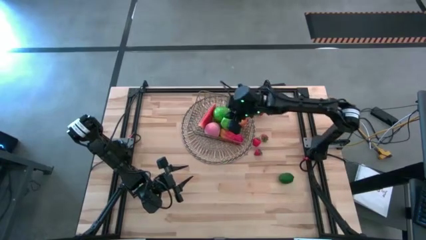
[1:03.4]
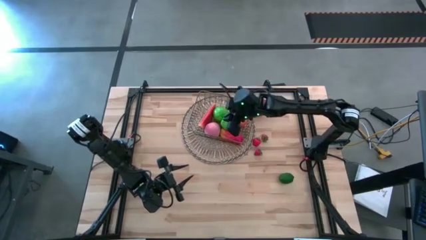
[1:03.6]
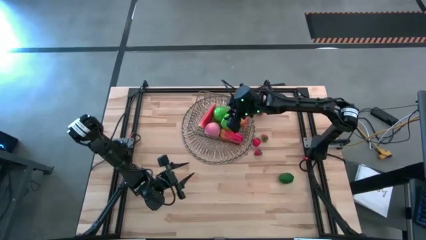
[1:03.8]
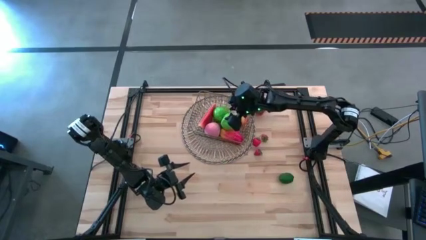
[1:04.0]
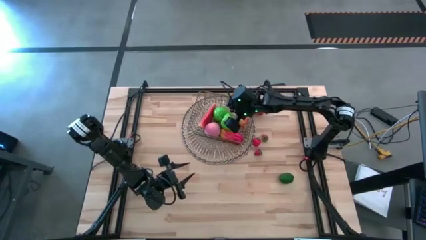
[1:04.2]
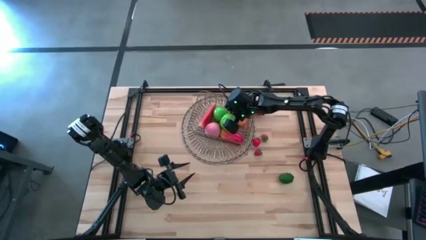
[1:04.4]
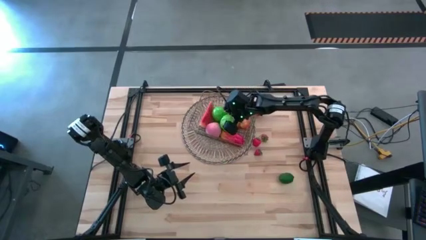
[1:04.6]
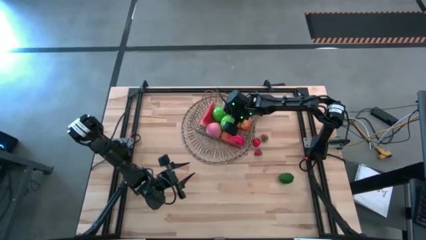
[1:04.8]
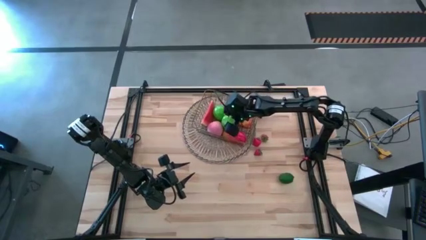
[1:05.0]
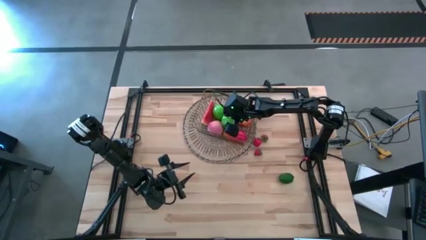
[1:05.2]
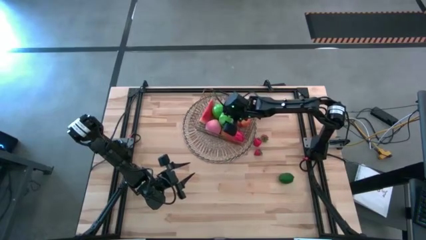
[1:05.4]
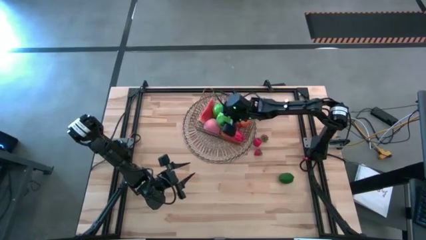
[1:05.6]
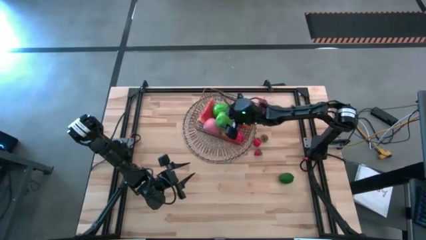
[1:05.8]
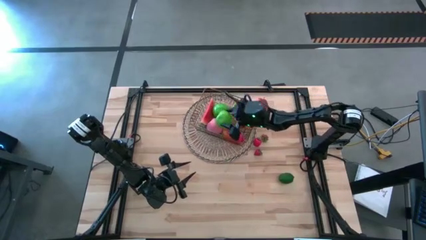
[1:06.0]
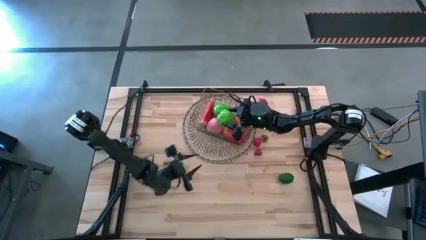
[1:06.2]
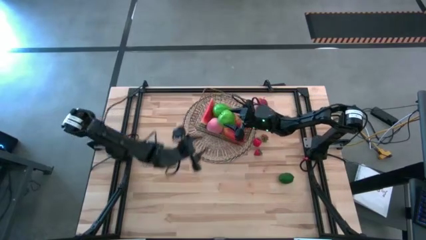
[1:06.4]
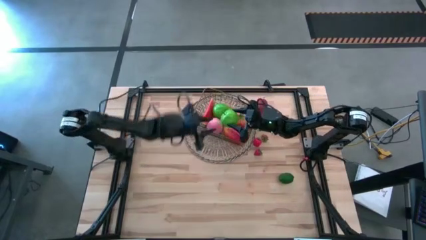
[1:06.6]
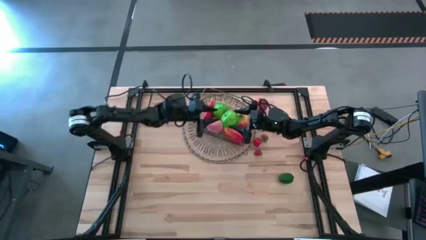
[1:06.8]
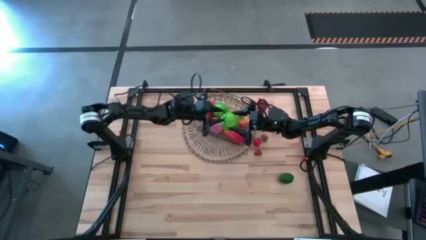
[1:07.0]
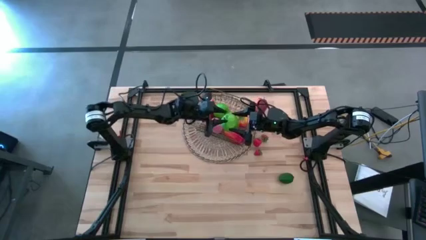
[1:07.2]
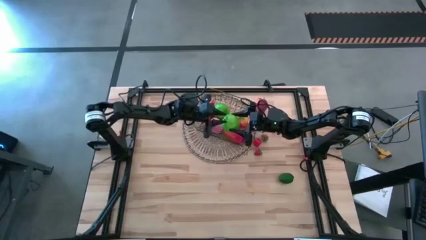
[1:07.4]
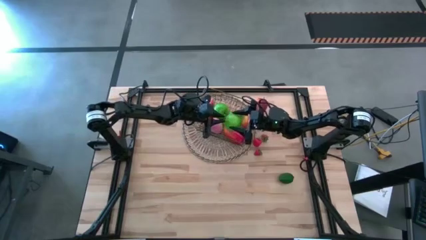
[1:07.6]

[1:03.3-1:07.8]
Task: Build produce basket
Put the green apple into the gold wire basket

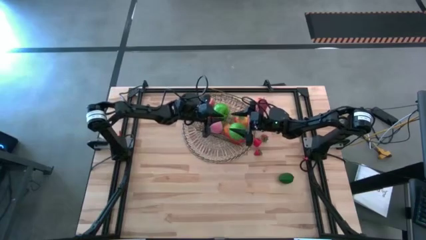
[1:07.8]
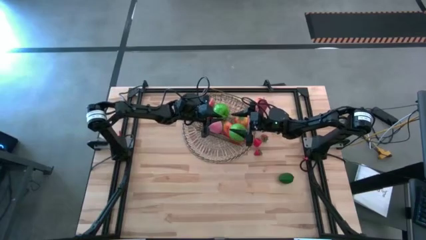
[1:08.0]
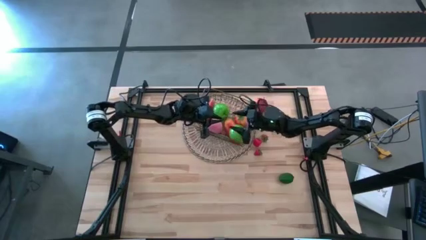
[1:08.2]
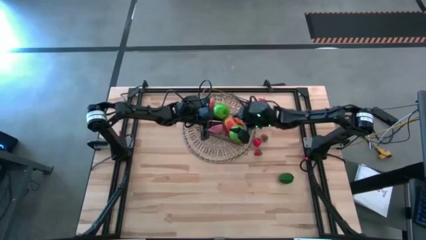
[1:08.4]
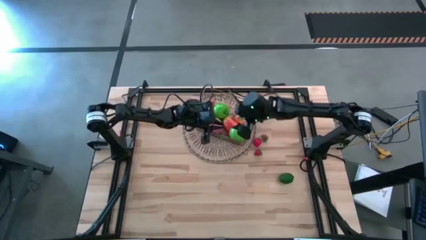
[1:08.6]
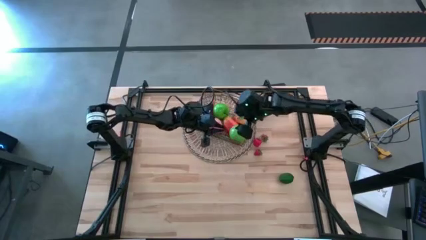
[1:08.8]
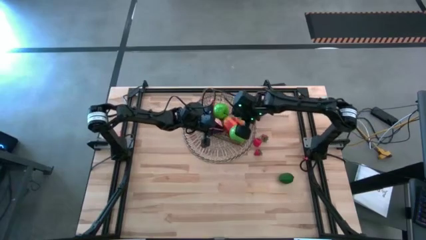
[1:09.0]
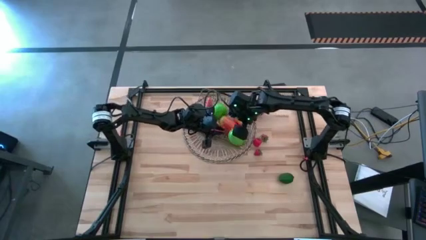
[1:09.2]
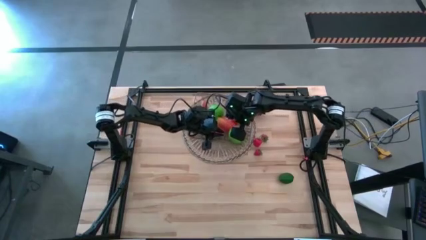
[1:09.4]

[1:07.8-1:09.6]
Put the green apple into the gold wire basket

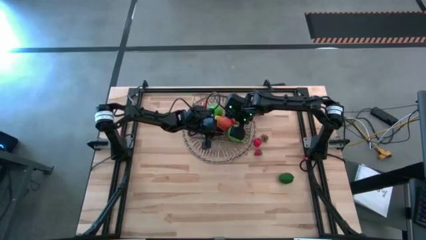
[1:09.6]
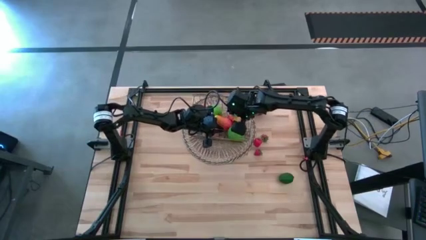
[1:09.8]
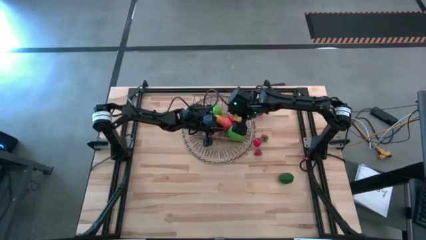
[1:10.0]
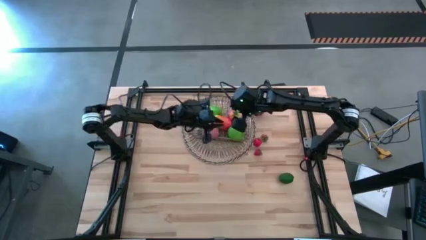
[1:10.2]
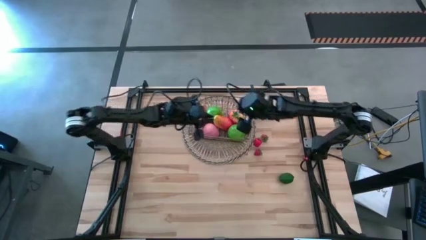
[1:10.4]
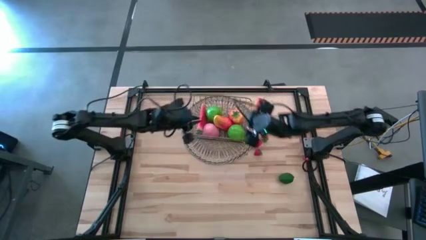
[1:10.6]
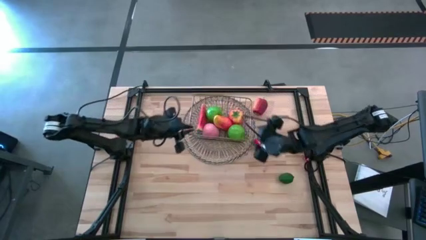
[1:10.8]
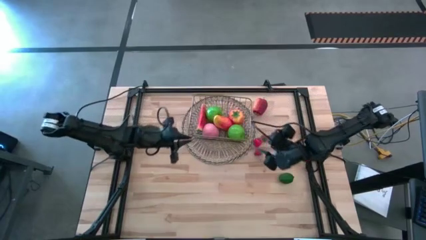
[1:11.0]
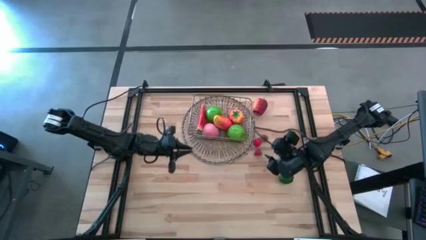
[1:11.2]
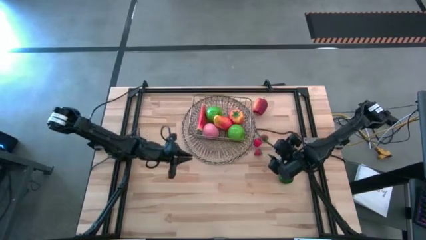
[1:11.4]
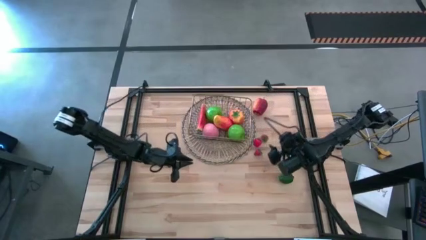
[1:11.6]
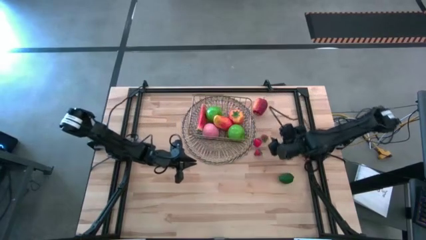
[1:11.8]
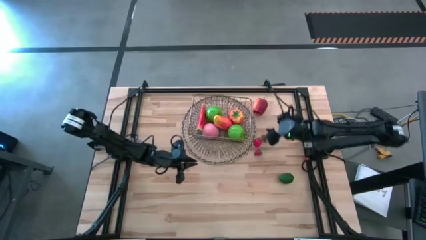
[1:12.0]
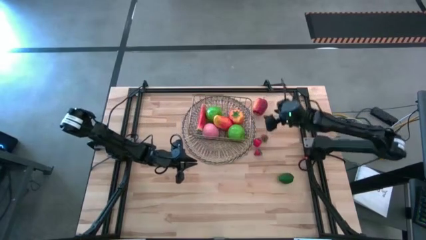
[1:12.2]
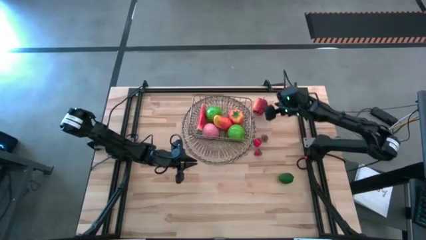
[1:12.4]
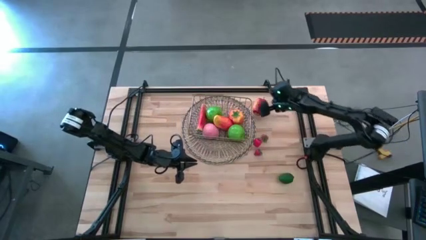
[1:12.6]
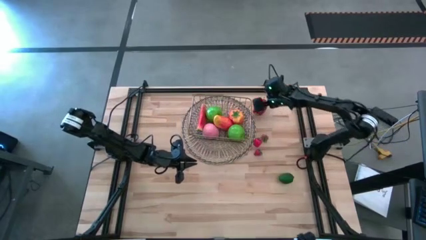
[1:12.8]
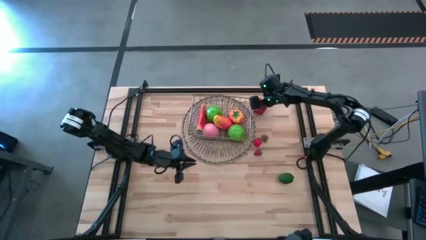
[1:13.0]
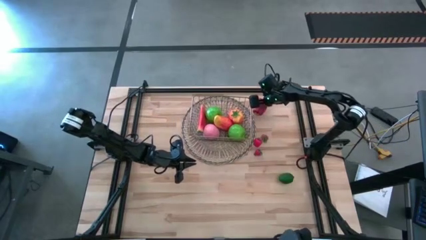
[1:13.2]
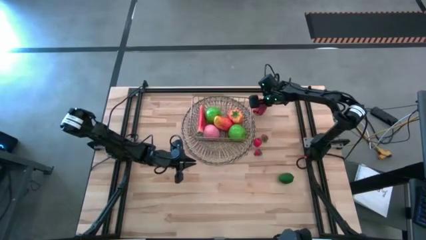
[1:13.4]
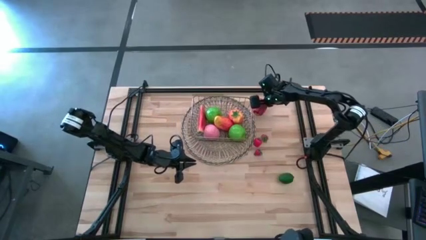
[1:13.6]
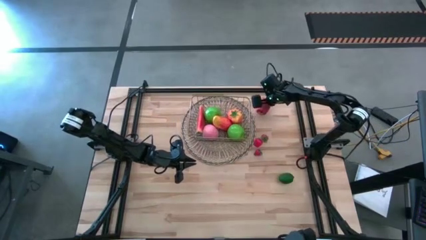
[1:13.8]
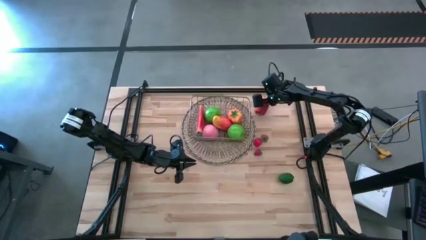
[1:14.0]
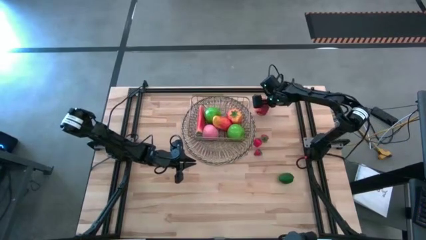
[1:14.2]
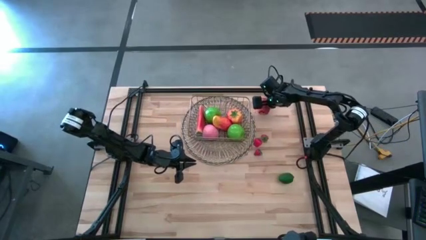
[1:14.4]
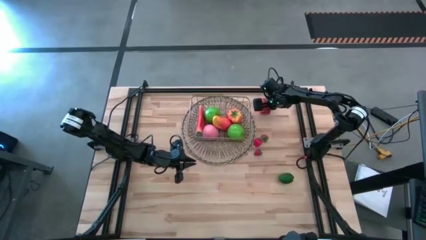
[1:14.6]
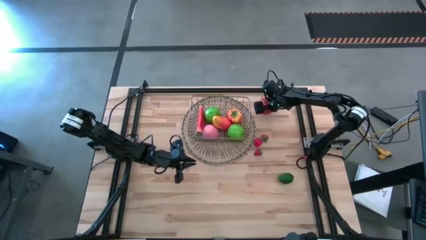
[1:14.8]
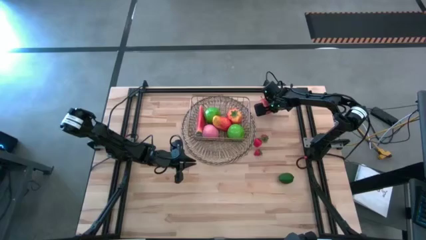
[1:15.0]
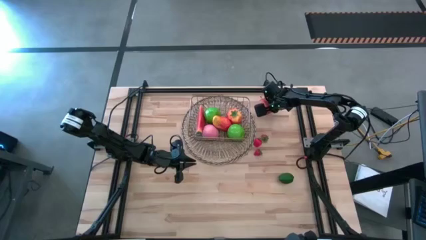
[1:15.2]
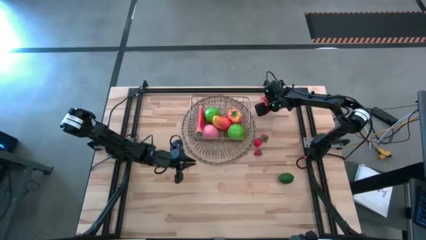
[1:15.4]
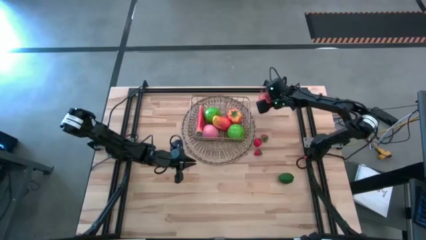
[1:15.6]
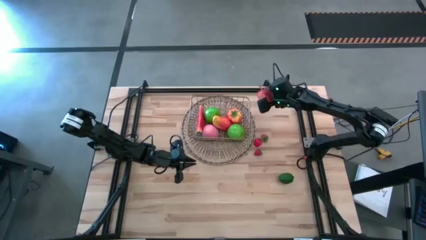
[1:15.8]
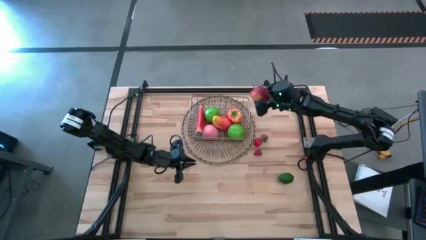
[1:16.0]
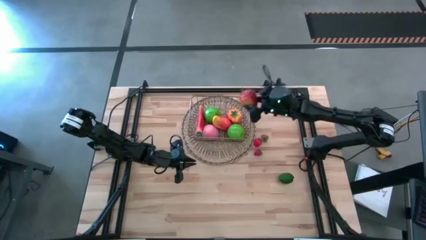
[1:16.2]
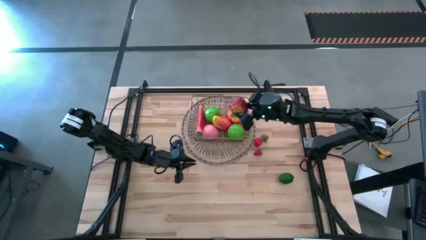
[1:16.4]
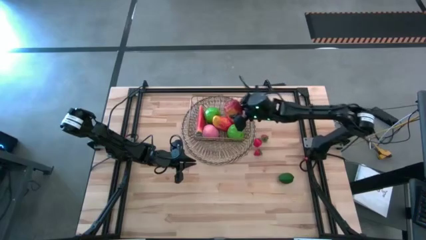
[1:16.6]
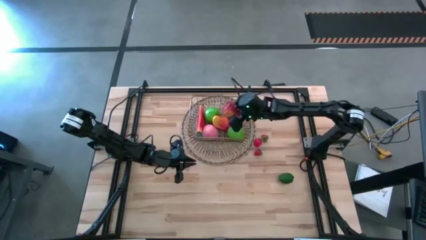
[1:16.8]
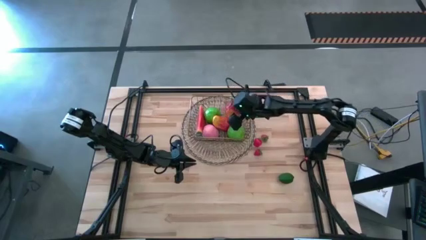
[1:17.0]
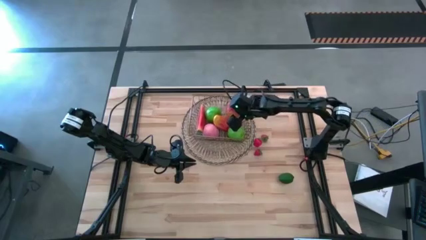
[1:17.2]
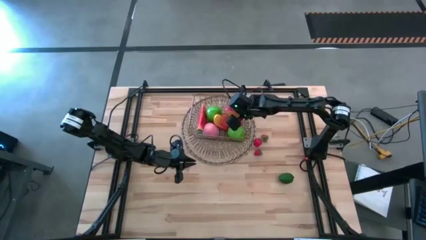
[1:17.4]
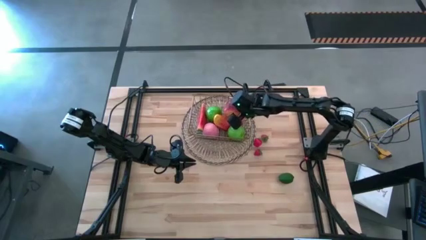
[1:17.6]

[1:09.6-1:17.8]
Put the red apple into the gold wire basket

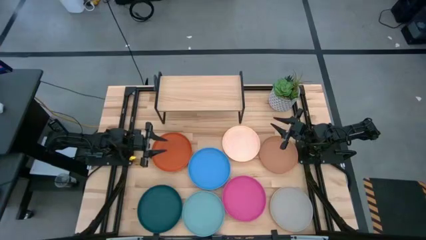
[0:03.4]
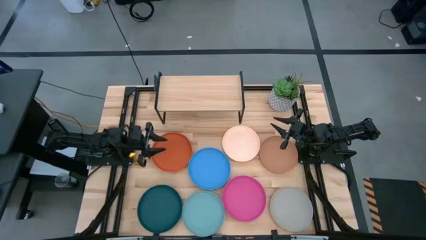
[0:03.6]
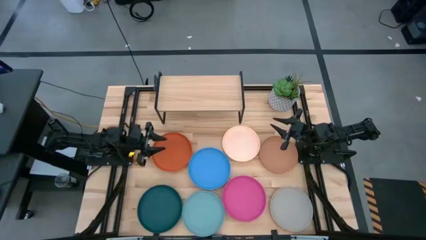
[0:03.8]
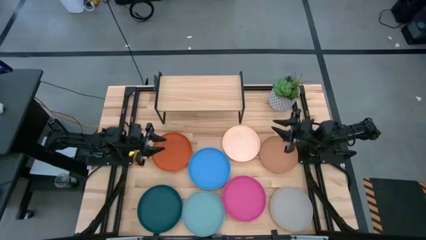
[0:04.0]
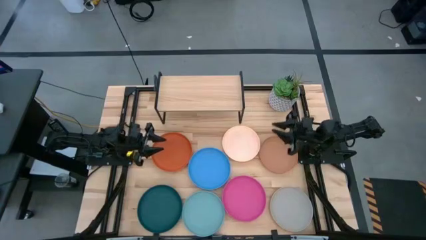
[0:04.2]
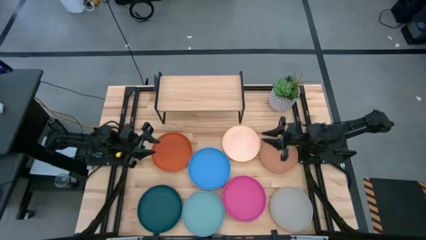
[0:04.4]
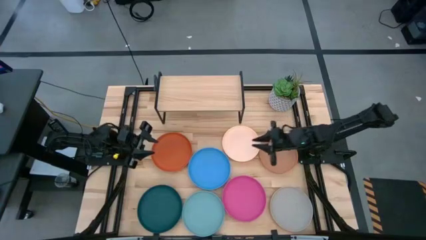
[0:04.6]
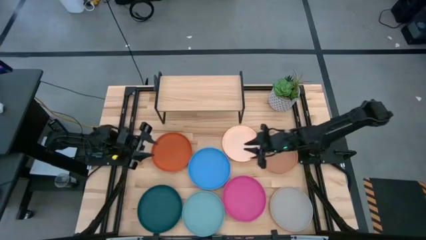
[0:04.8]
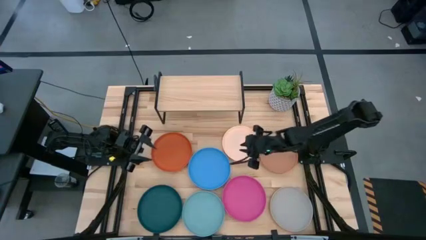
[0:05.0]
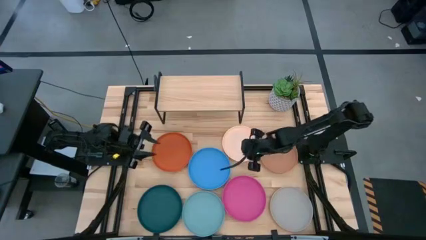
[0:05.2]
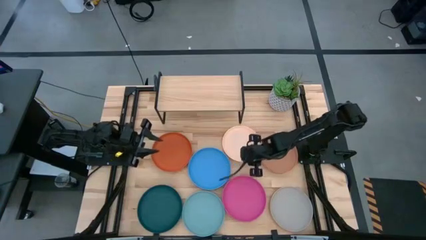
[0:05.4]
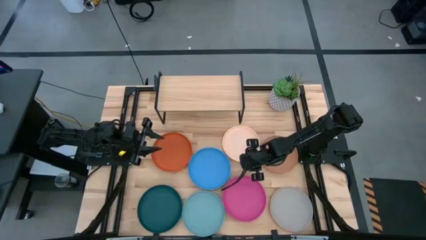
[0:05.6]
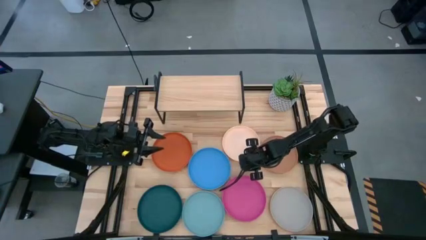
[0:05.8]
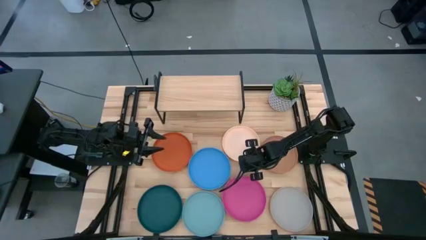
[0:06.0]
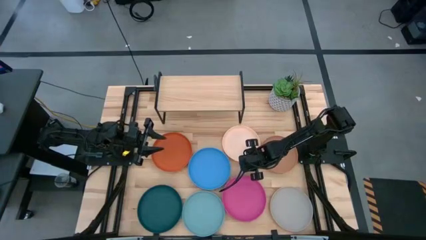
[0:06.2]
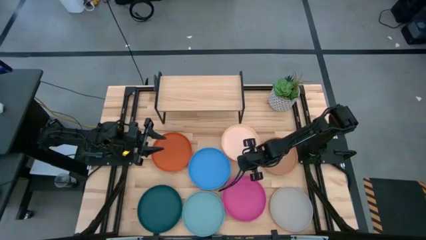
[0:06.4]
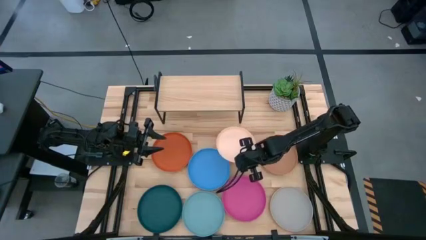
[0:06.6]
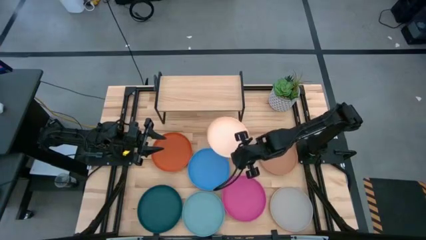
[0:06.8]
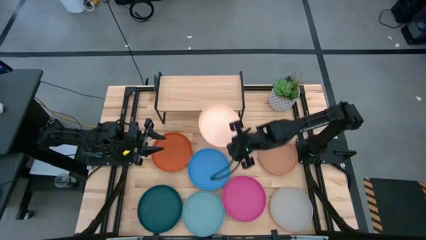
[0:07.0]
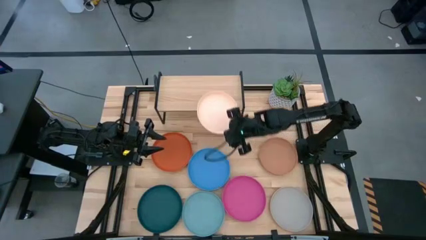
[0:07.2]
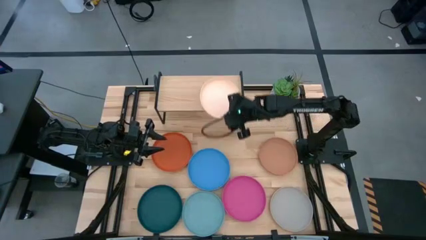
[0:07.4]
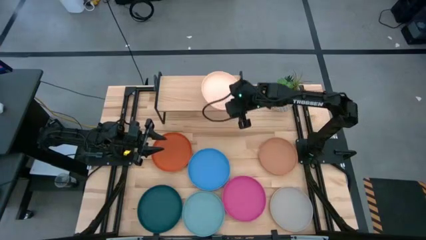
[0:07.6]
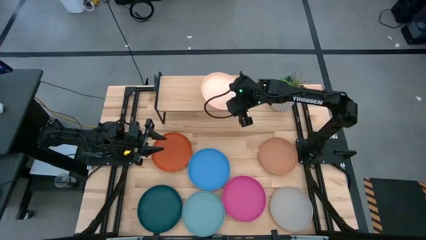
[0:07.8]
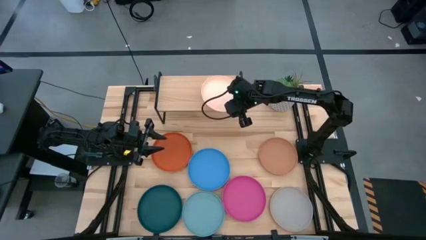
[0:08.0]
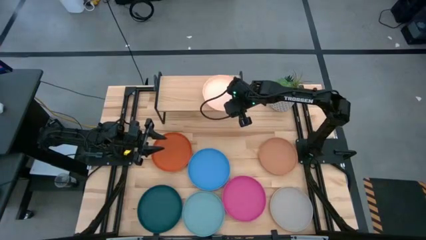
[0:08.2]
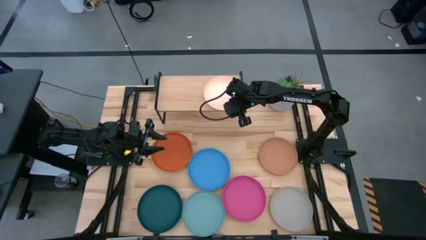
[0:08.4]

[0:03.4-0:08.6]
Task: Place and stack plates onto a shelf
Put the peach plate on the shelf
